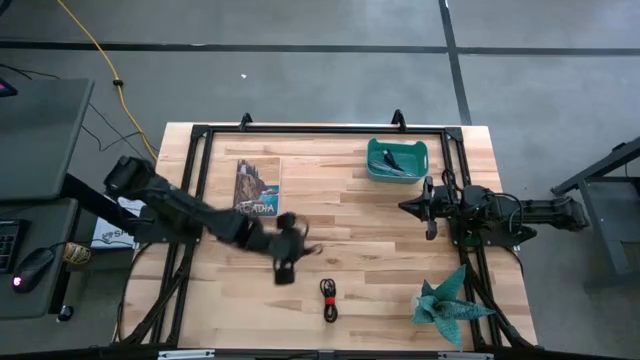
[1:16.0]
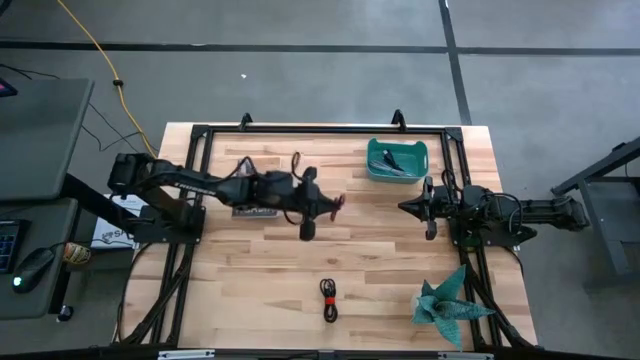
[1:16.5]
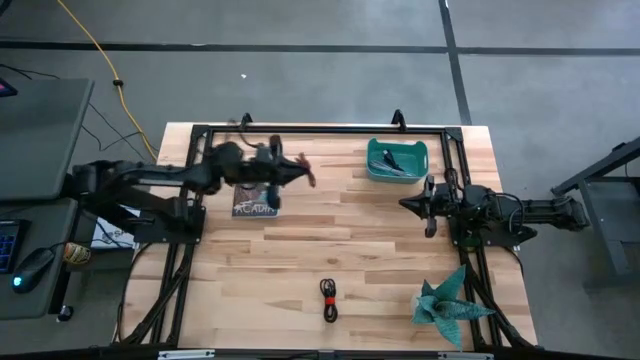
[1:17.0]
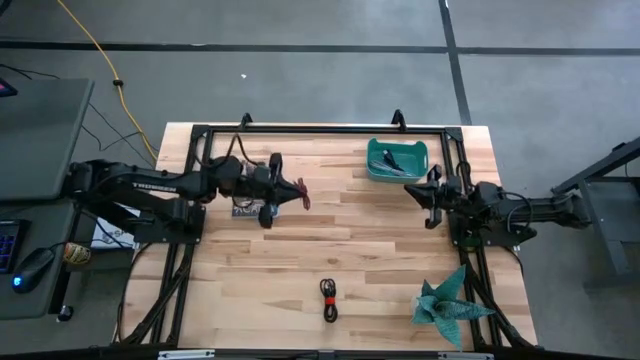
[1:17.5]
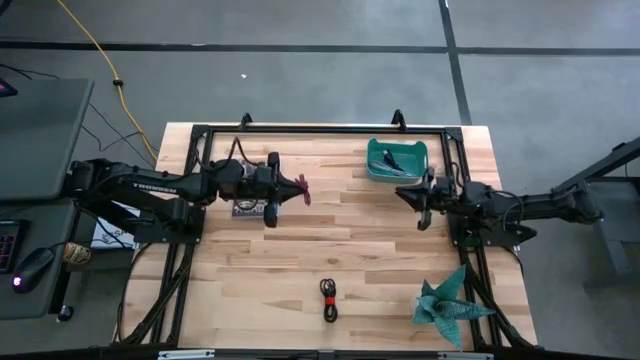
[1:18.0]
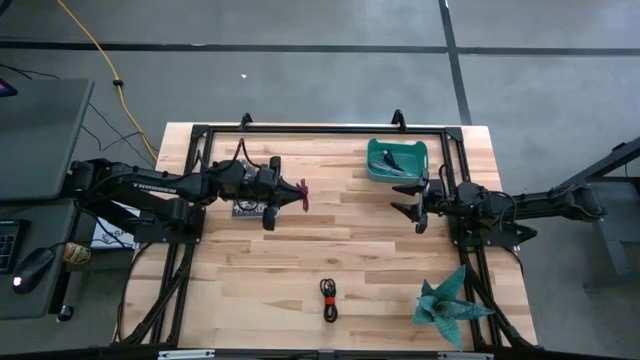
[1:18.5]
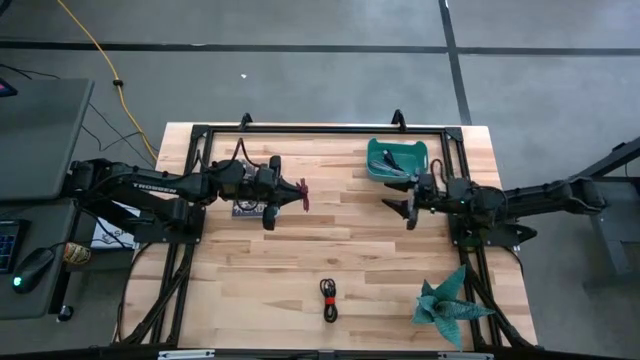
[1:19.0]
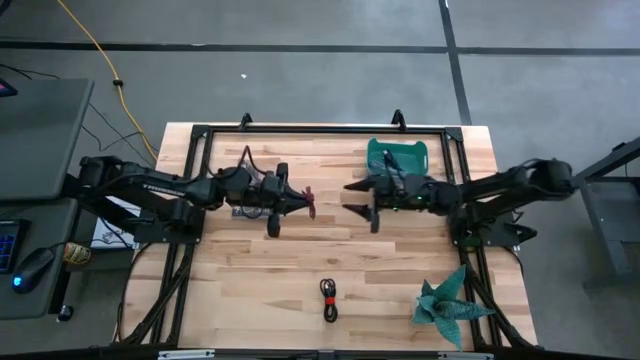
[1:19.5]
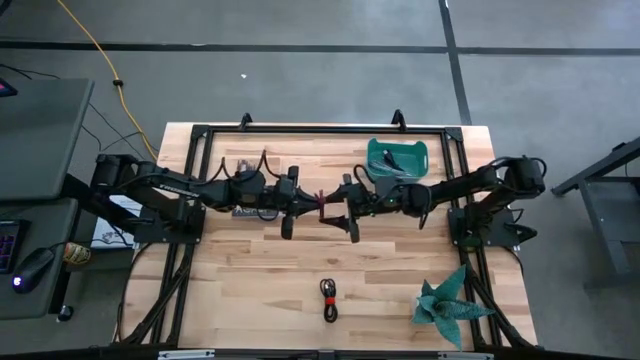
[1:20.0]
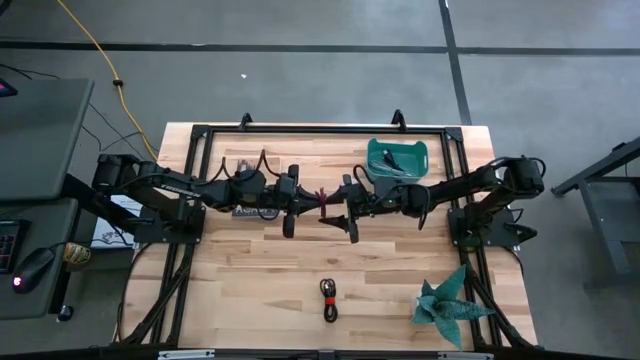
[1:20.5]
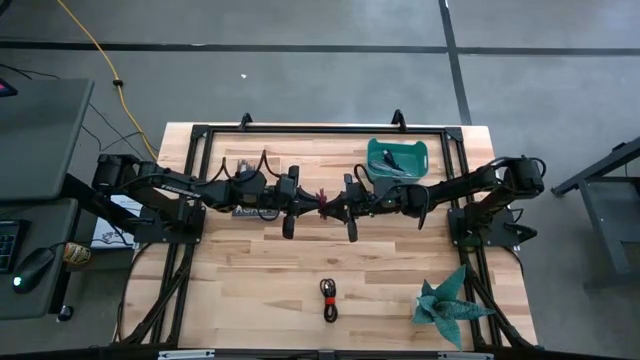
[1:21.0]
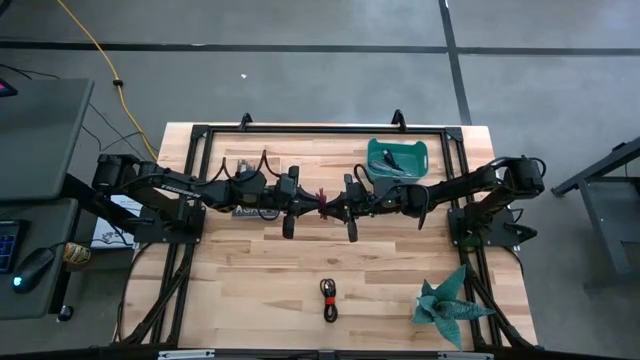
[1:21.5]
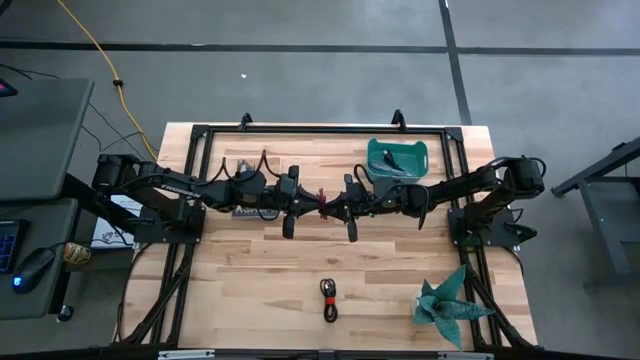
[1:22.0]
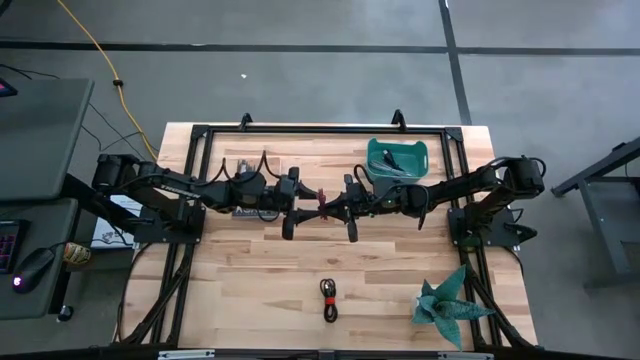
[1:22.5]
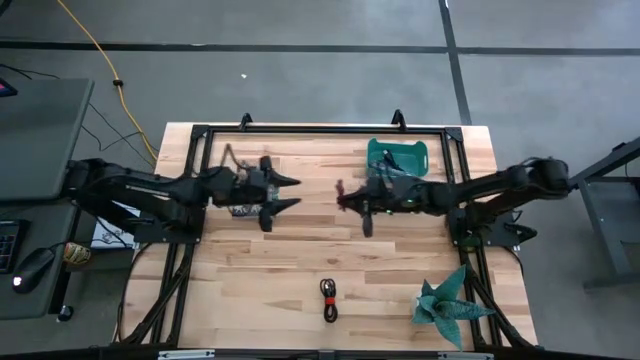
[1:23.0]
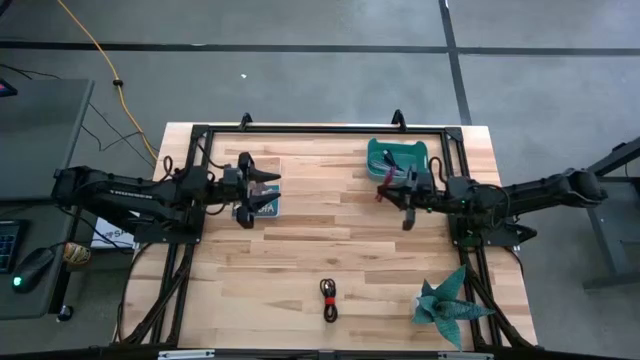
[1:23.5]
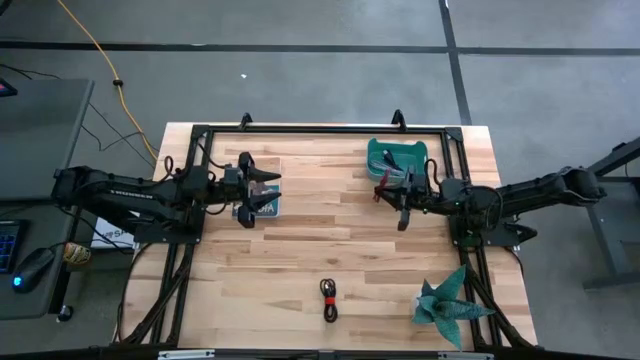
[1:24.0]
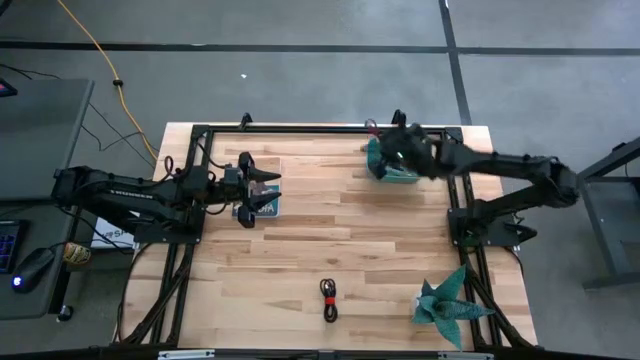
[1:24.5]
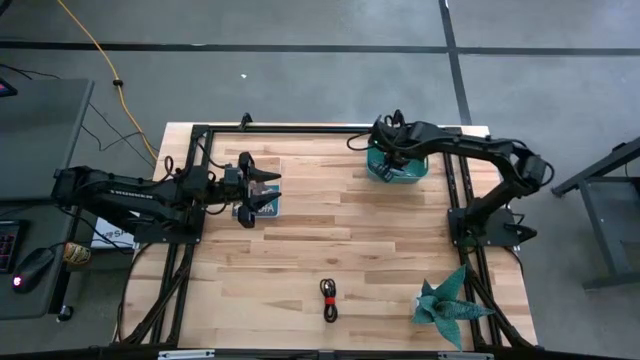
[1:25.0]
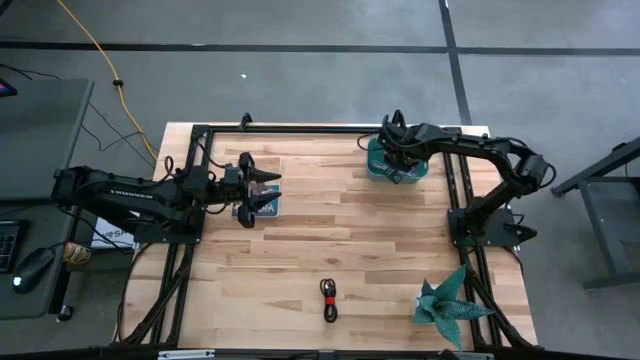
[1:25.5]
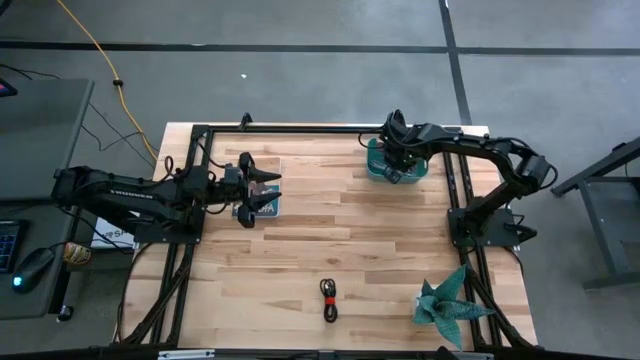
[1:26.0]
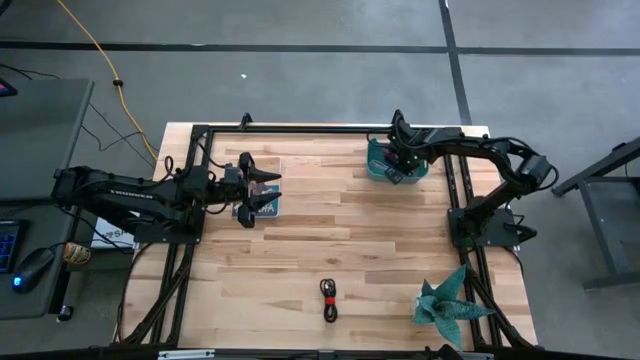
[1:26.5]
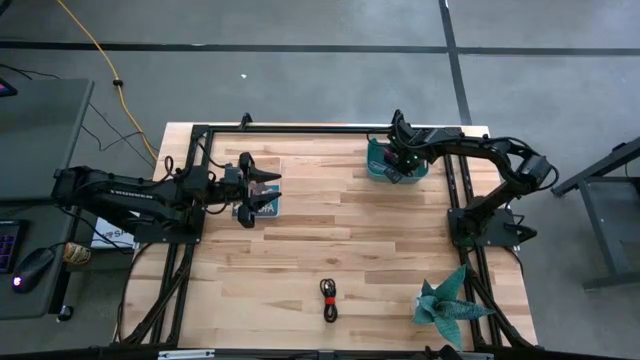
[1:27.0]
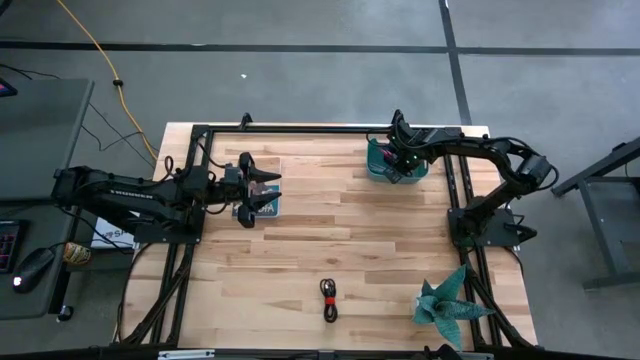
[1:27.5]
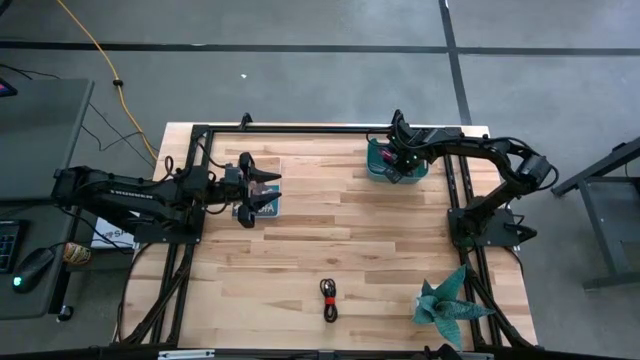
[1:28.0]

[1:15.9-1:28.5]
Task: Pick and place USB-C Cables
Put the pink charger cable into the green bin

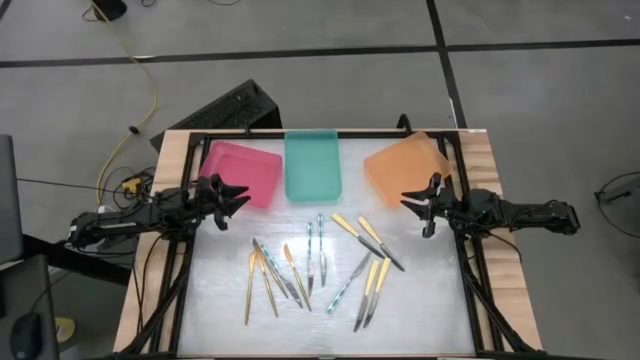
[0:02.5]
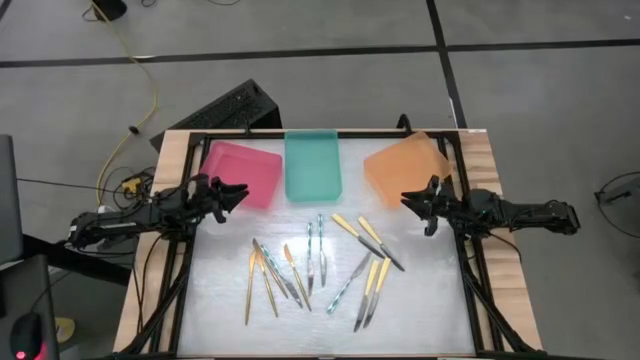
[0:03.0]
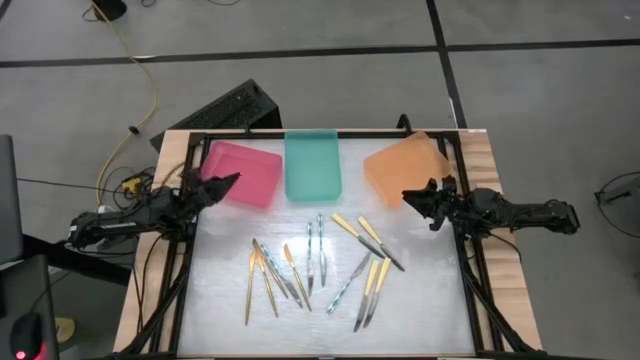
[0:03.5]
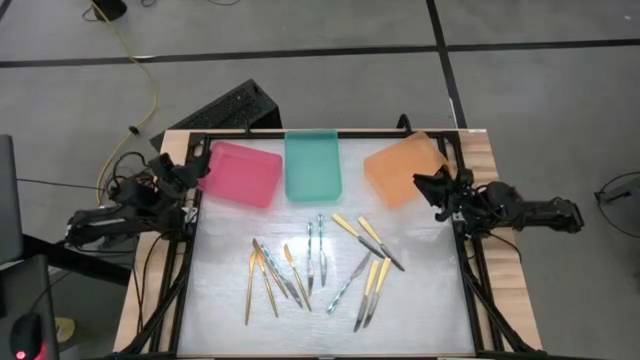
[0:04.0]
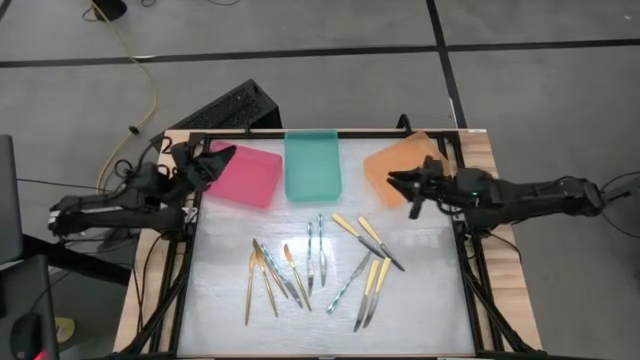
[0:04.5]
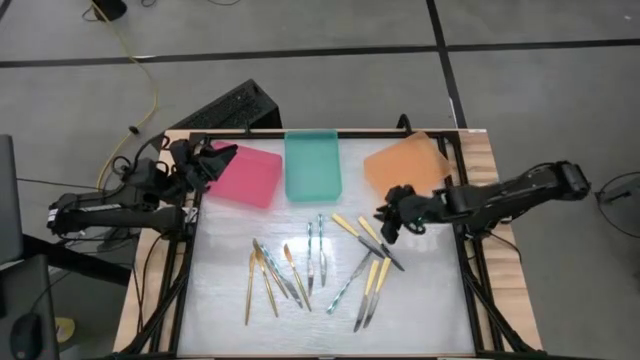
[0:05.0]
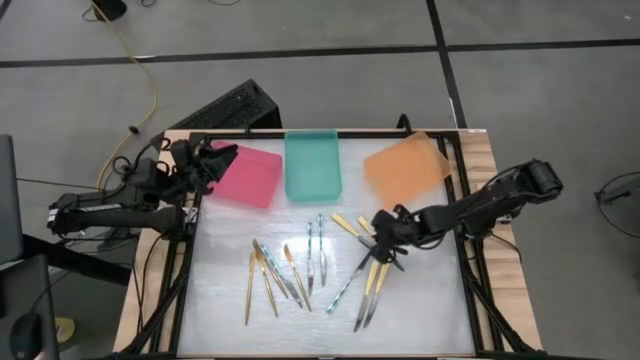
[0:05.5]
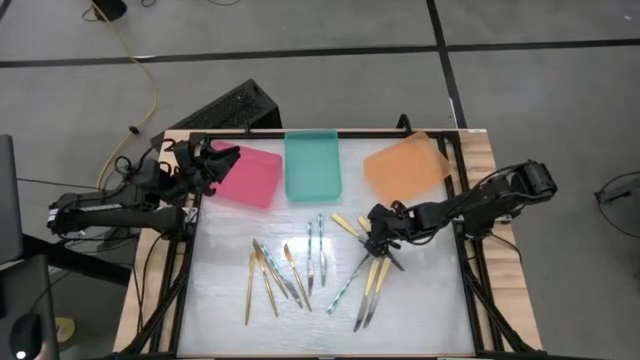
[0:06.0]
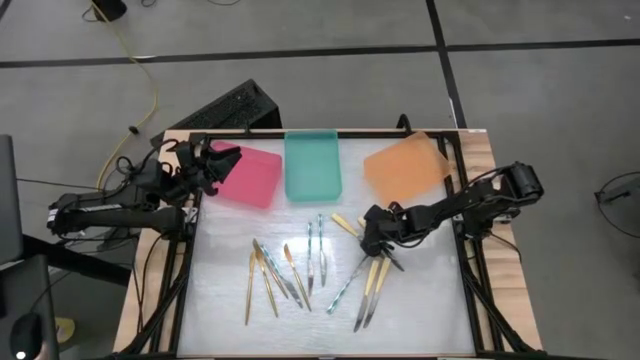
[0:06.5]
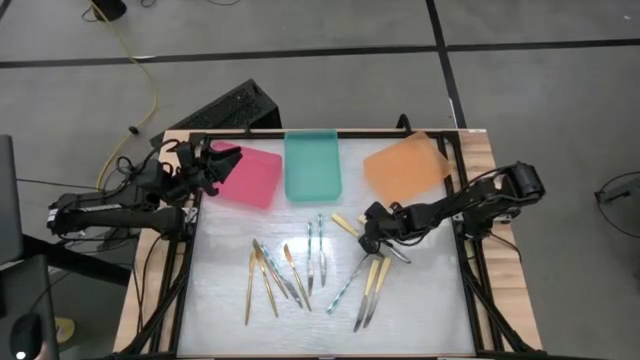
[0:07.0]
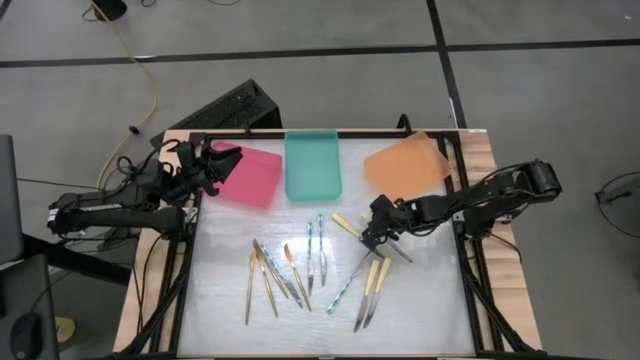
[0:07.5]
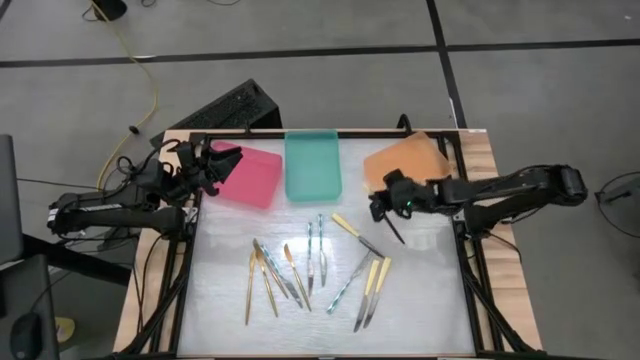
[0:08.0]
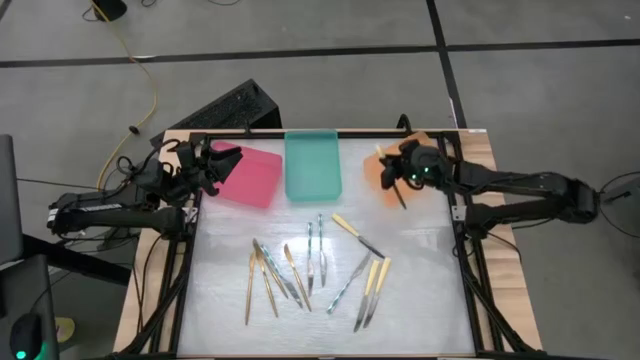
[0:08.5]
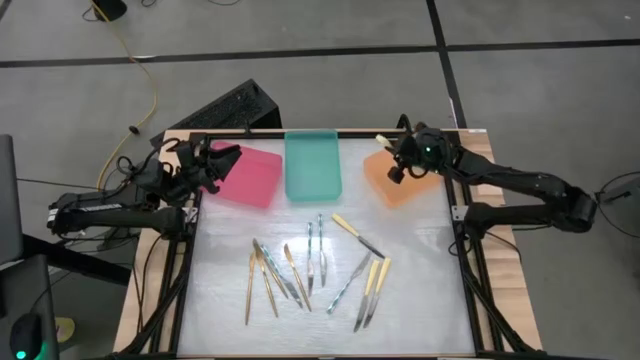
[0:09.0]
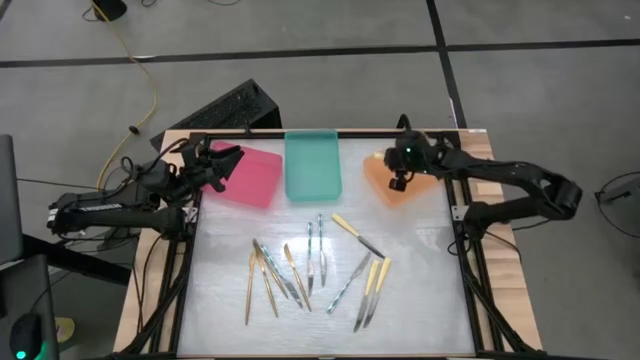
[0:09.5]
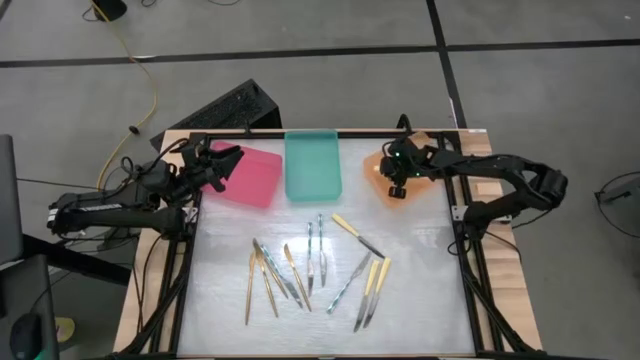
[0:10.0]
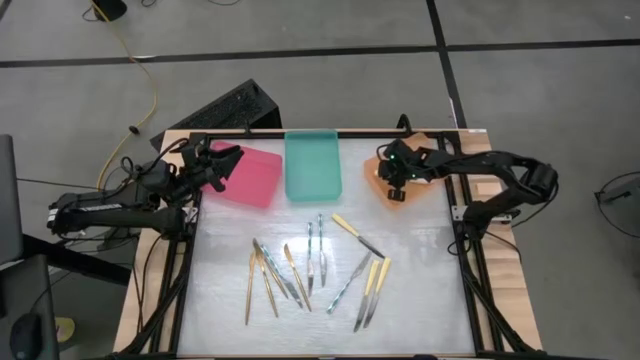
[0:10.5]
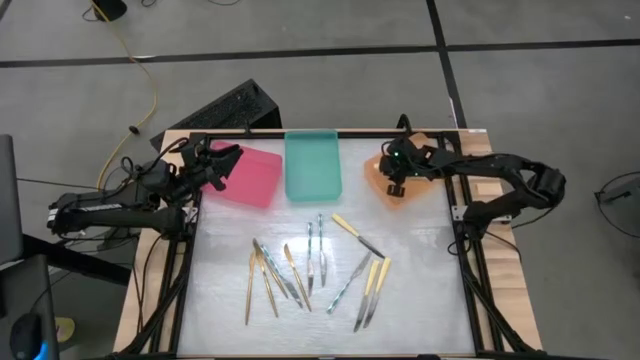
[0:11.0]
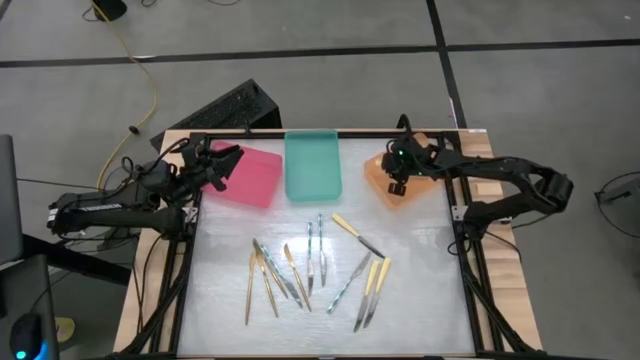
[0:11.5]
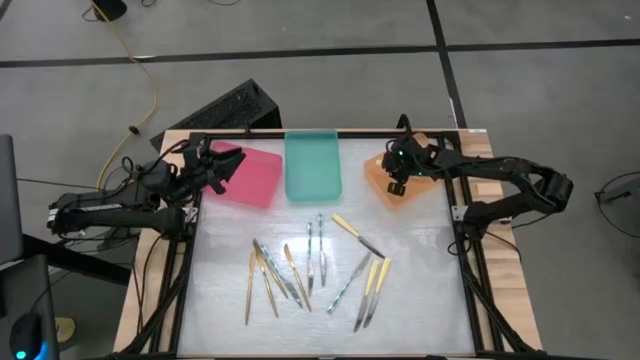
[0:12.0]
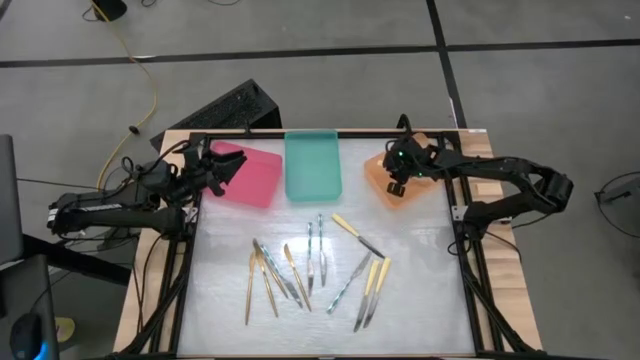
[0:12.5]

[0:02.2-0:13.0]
Task: Sort silverware by color (type)
Put the yellow knife into the orange bin
